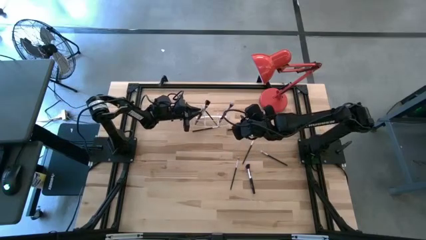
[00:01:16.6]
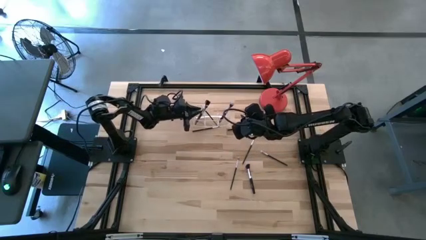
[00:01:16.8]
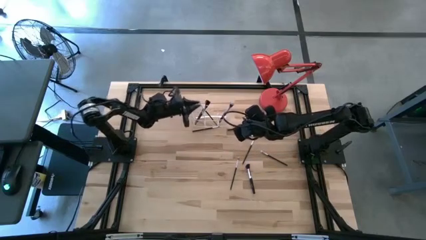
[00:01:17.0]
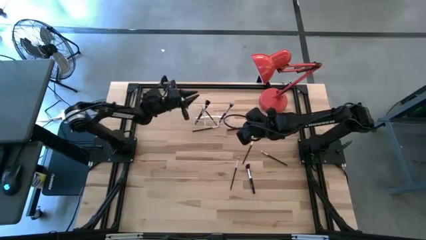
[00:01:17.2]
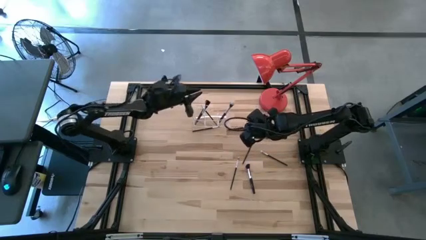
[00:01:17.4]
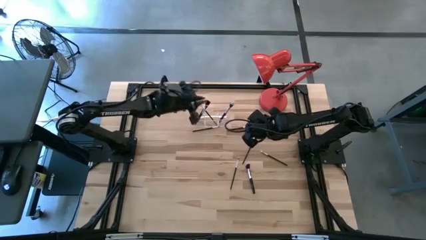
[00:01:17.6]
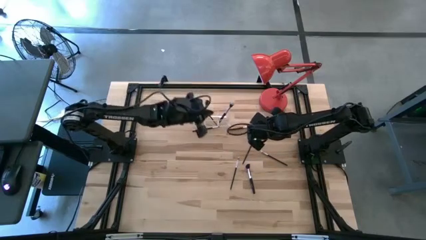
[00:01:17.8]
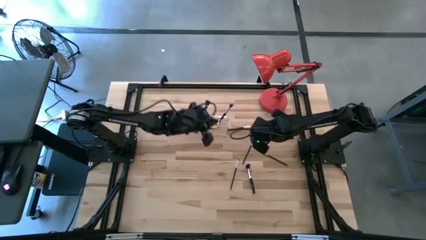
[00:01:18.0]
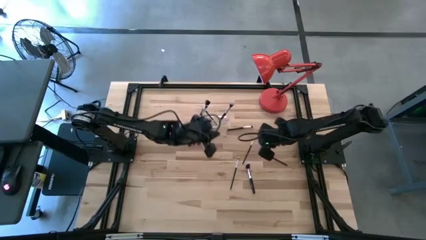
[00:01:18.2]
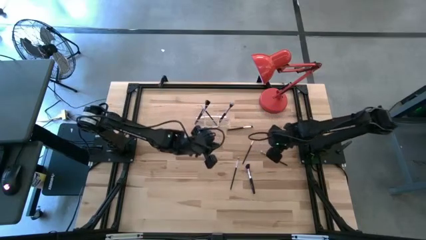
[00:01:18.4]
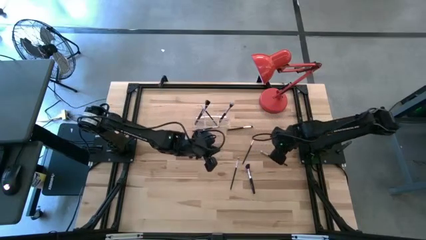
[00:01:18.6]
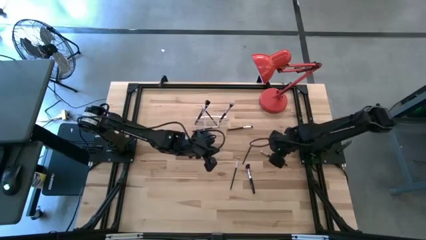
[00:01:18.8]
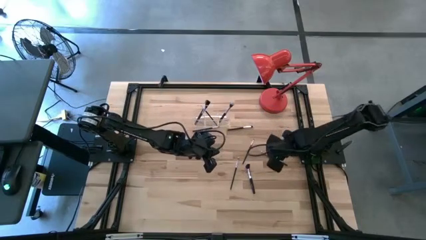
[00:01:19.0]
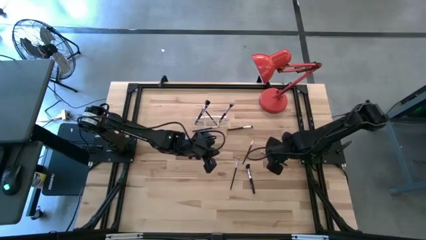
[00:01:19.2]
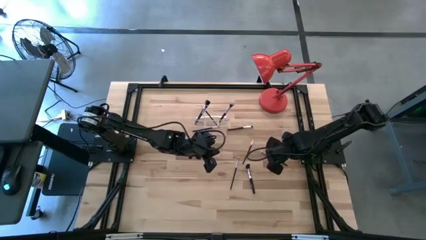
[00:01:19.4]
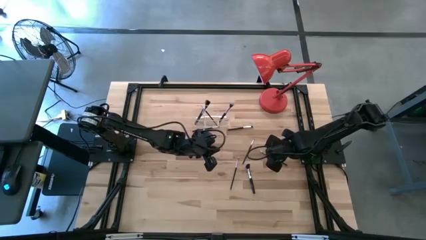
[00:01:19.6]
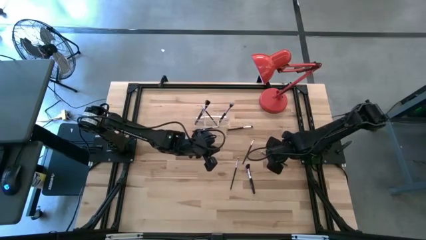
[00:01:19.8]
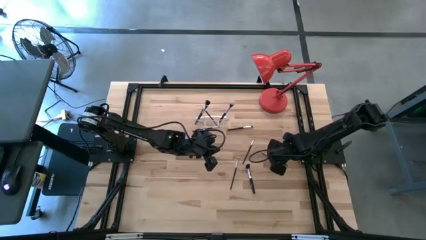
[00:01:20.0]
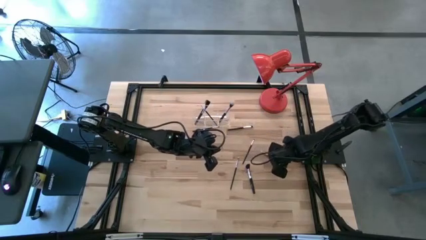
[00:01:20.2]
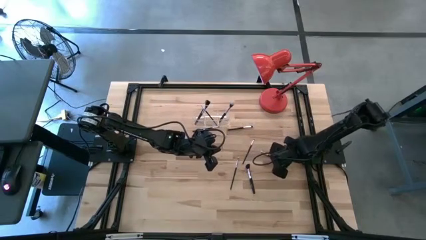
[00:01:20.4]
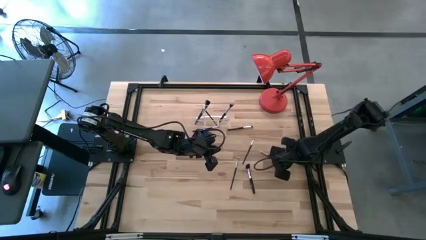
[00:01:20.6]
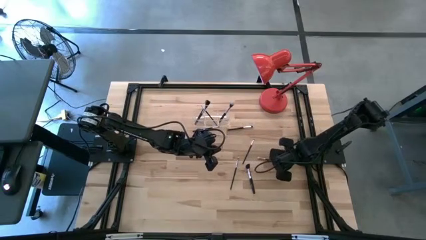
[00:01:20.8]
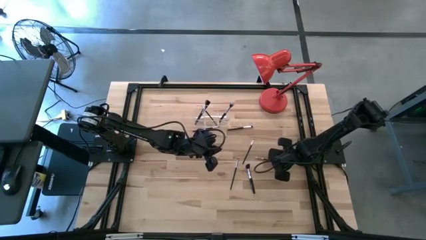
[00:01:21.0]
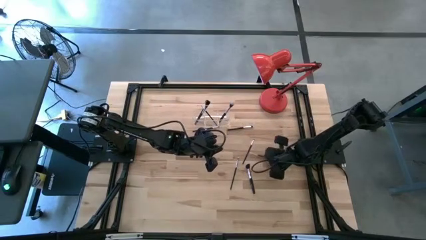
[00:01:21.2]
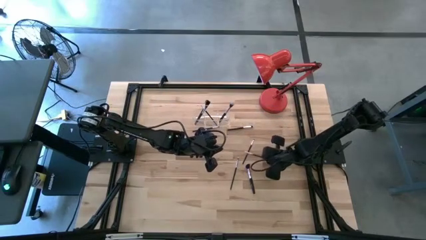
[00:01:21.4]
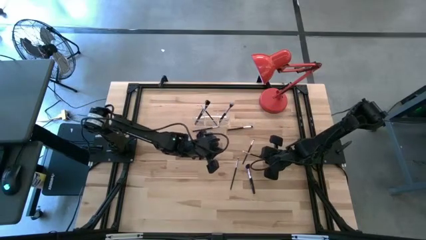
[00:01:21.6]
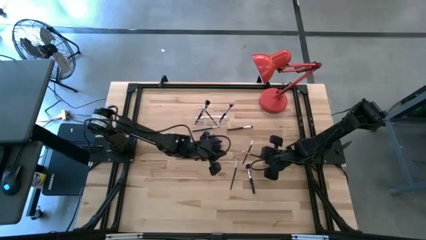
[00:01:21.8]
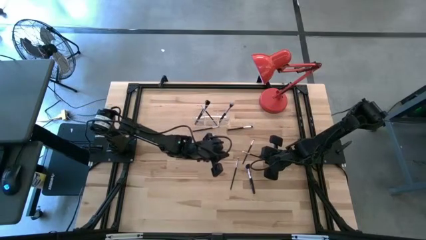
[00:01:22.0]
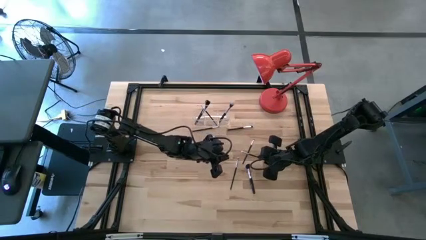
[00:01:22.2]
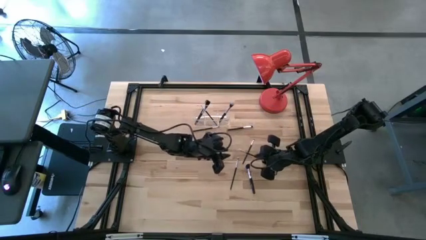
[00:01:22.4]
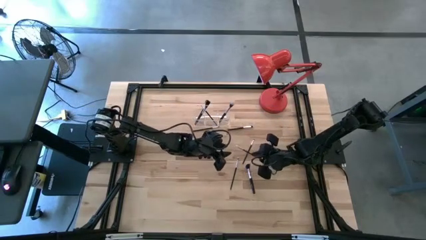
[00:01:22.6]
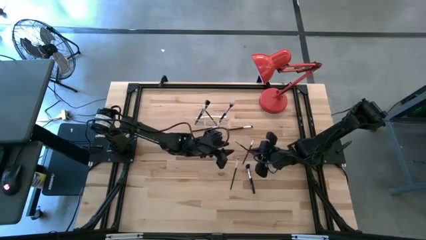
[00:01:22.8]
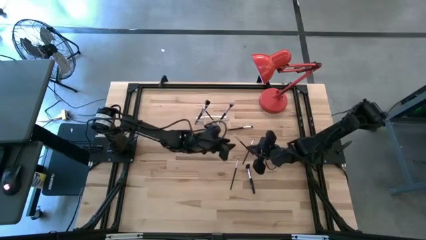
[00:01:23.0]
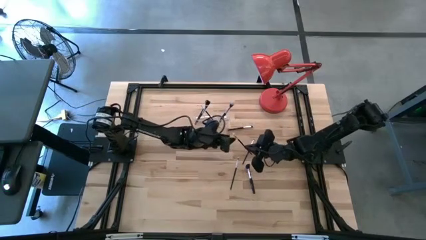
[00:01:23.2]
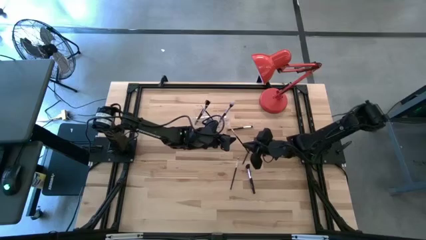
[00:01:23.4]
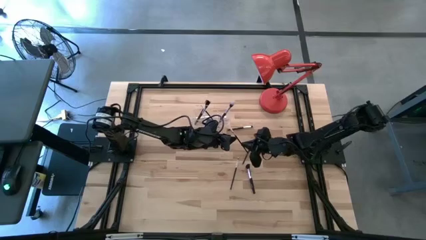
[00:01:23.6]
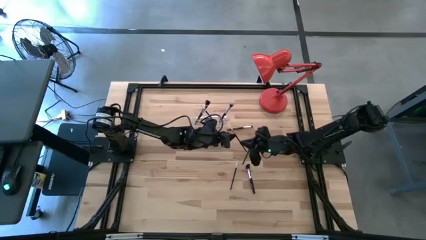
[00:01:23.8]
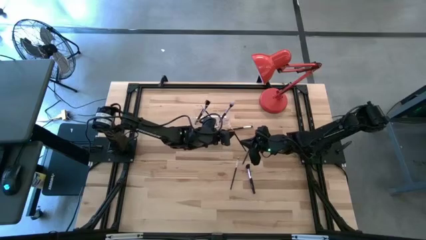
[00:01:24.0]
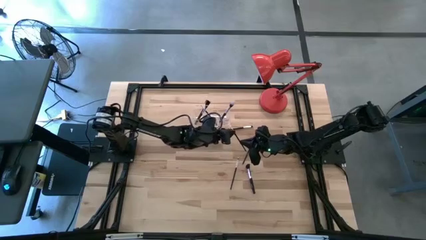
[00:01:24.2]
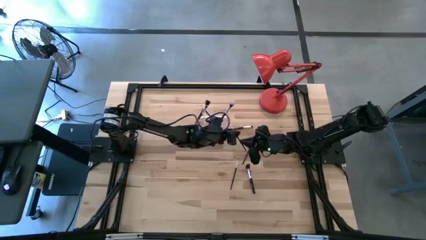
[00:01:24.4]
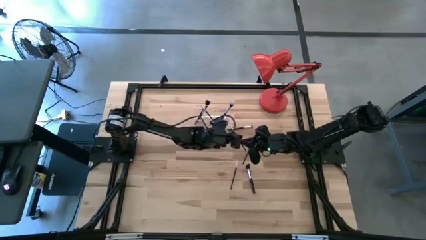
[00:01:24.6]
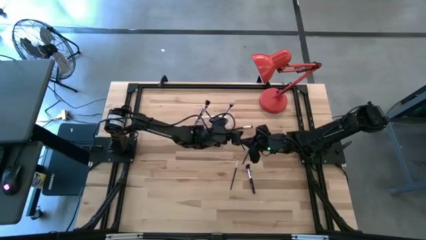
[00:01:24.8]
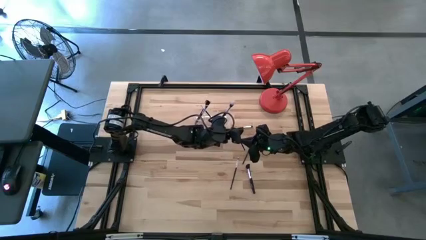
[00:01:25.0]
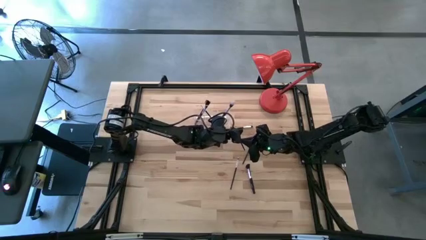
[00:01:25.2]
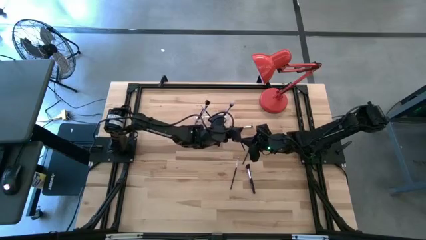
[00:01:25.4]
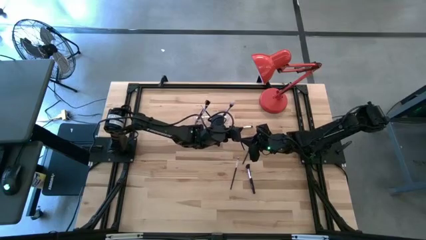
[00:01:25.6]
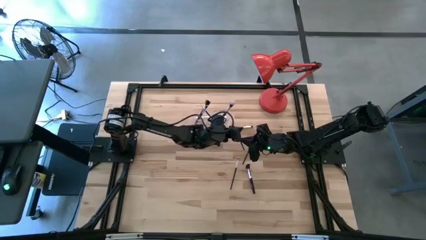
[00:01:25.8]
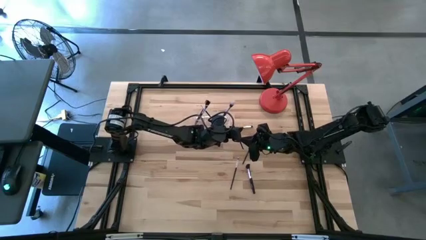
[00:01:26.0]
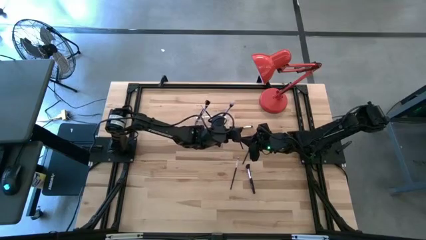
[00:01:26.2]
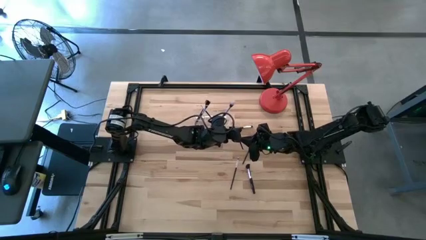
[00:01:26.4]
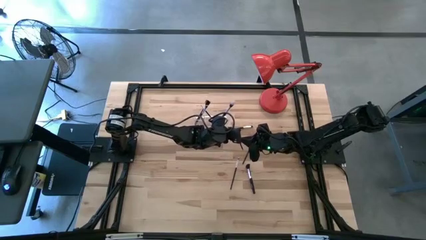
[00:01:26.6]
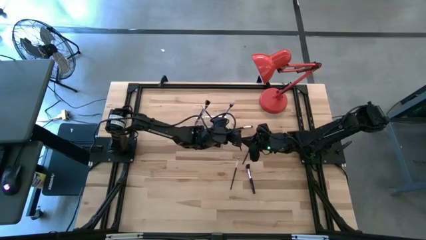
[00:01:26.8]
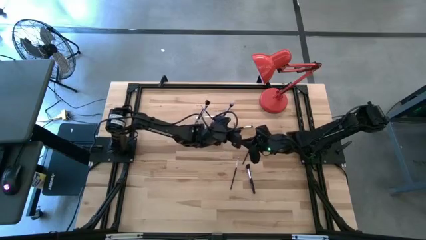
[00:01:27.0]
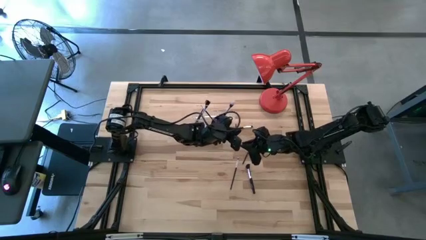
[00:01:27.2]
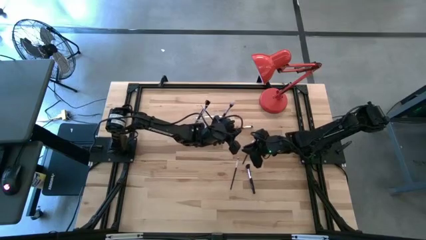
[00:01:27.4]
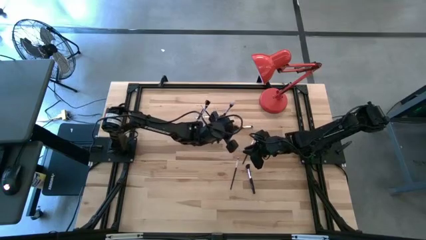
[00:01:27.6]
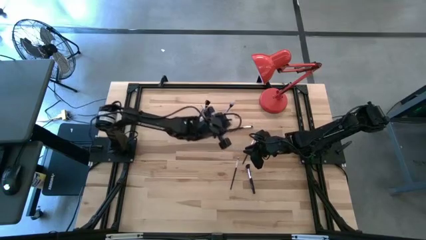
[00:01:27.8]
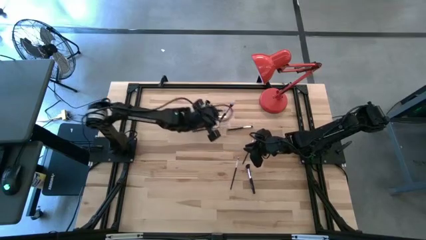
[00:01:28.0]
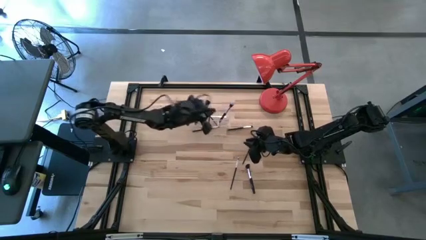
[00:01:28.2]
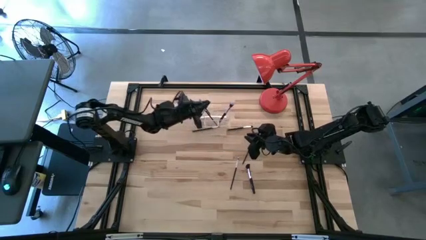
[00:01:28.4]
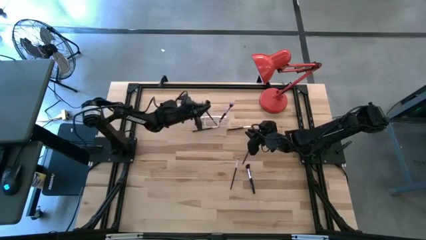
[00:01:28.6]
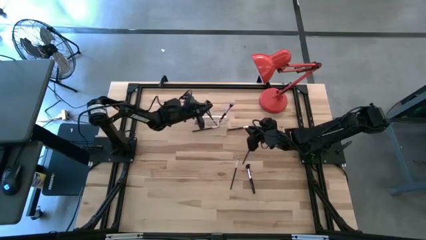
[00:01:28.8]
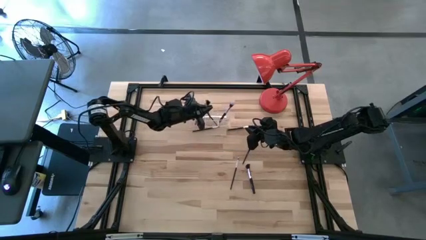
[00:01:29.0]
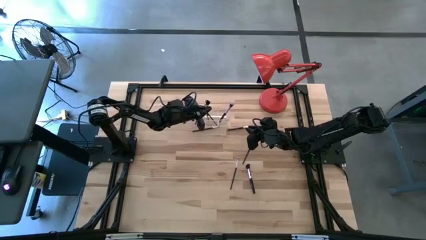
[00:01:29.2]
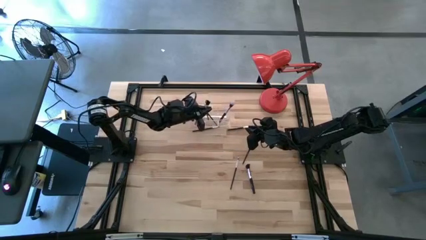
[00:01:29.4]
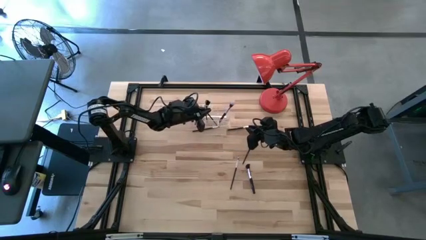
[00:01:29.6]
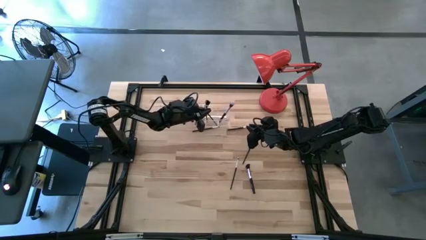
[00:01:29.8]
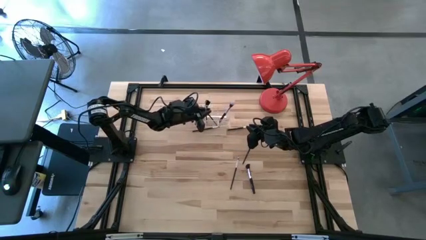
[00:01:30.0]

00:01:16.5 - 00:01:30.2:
Task: Put items in baskets/containers
Put the white eyeshadow brush into the transparent organizer

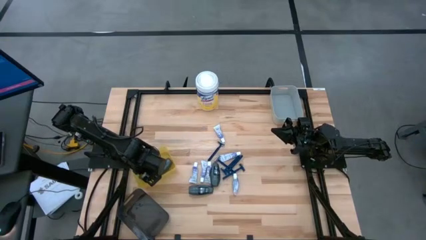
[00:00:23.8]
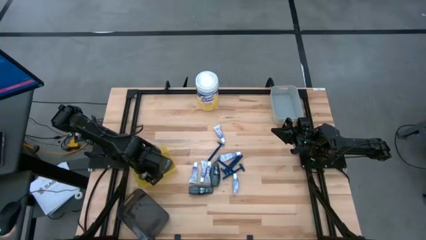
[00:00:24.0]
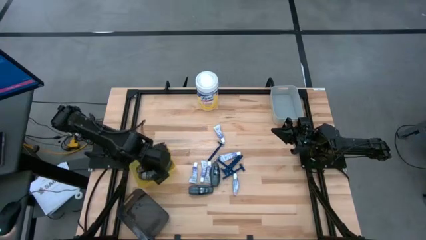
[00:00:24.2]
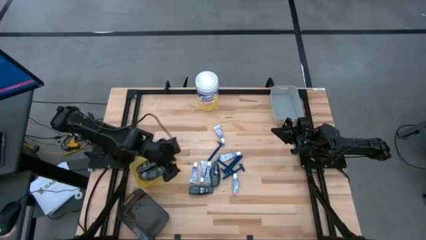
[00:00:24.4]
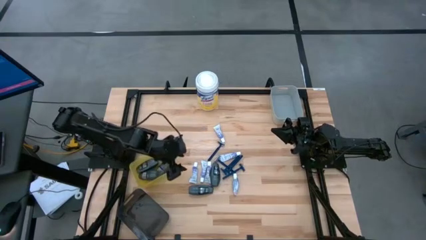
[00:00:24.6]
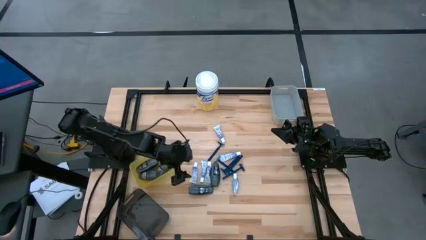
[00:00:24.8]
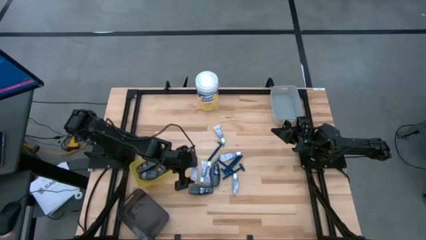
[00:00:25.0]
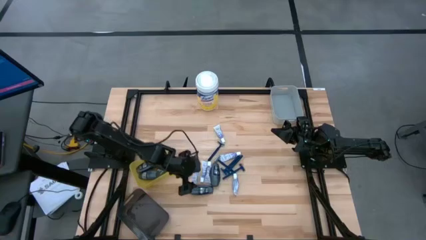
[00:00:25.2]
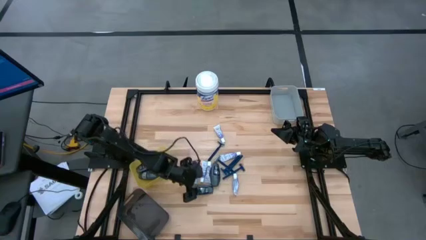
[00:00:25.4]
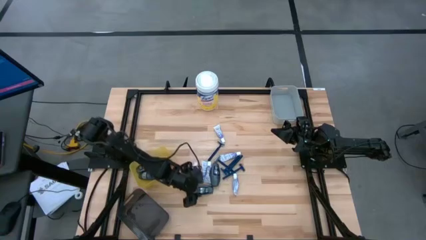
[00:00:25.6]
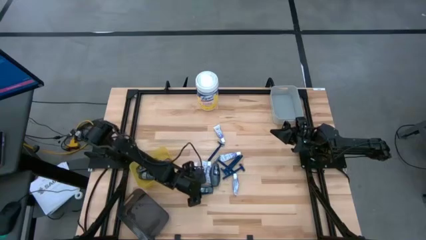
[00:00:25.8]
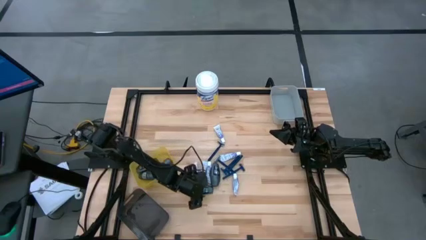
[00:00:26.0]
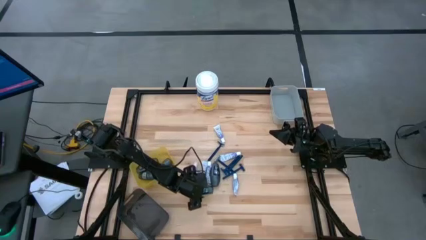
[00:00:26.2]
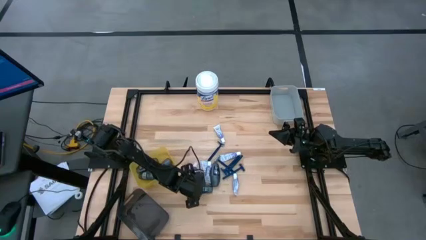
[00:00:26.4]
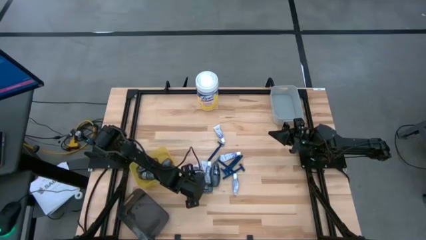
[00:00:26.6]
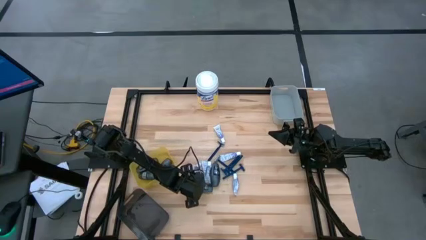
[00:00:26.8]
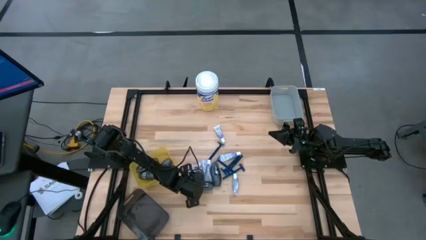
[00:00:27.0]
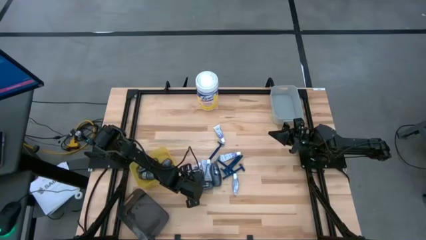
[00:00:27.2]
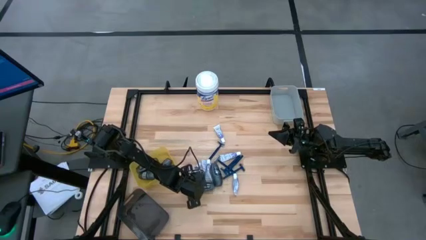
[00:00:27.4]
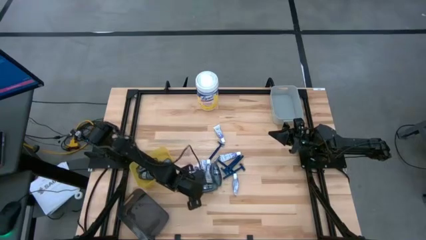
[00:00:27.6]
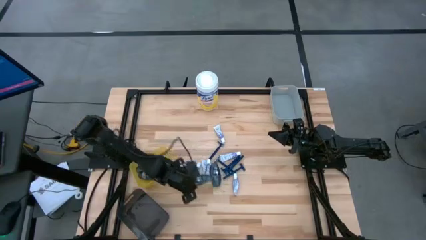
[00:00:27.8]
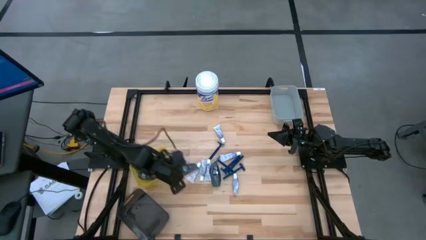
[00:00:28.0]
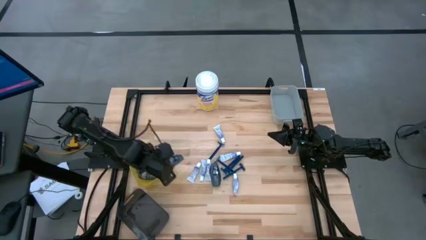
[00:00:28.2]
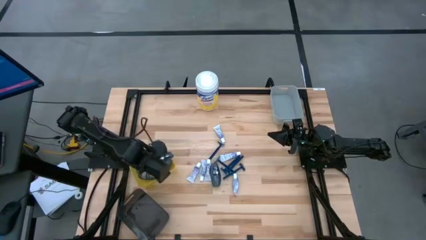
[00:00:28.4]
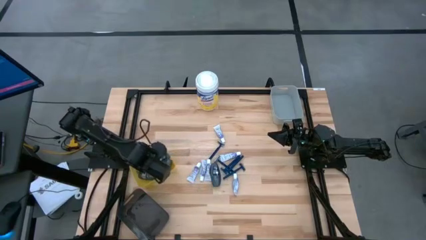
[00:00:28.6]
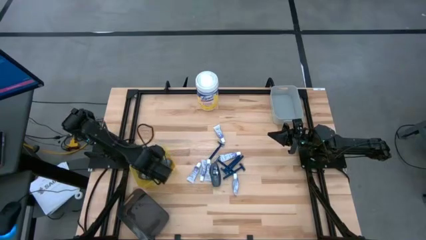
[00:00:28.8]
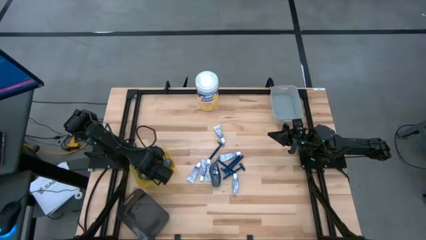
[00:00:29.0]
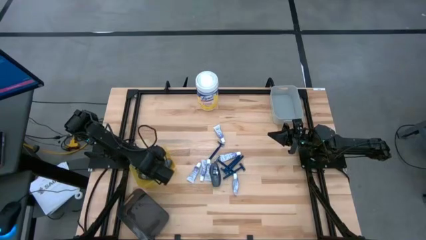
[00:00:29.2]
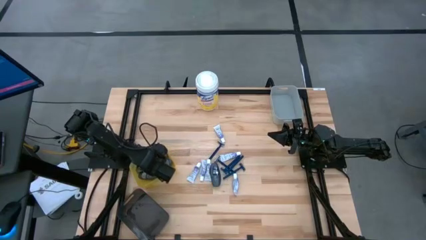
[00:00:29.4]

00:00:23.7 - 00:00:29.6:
Task: Pick & Place Travel size toiletries
Put the black deodorant into the yellow bin
